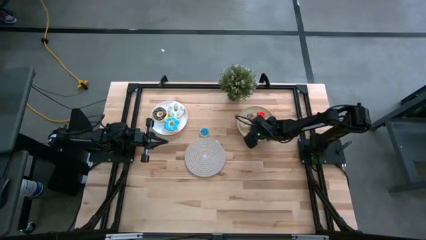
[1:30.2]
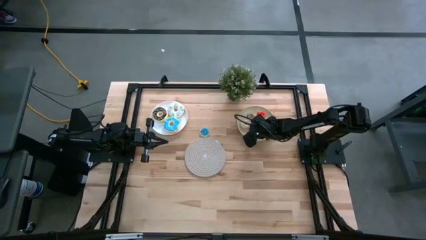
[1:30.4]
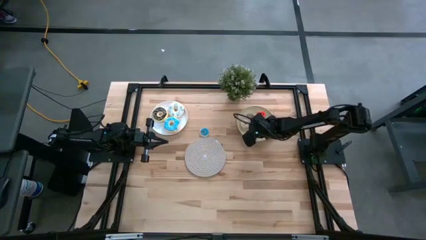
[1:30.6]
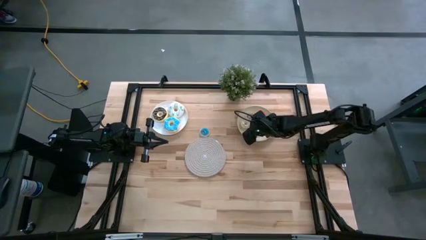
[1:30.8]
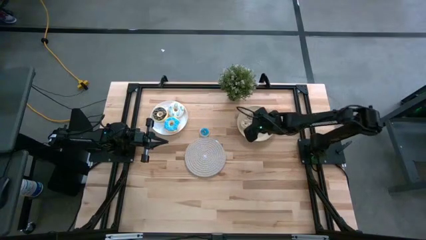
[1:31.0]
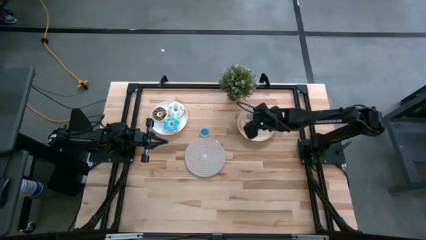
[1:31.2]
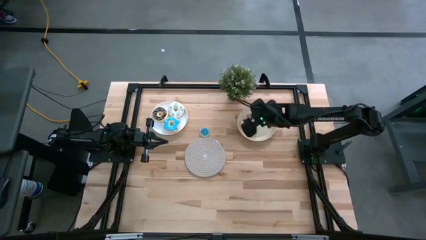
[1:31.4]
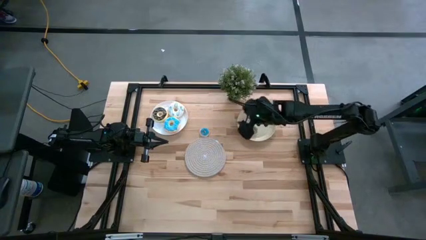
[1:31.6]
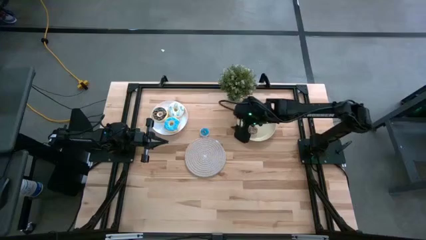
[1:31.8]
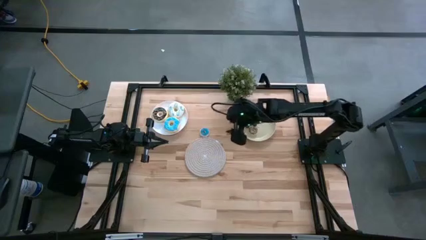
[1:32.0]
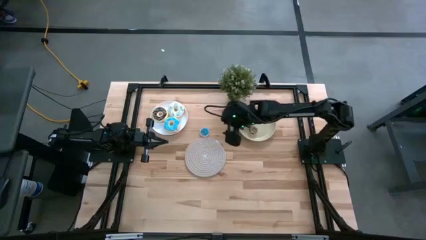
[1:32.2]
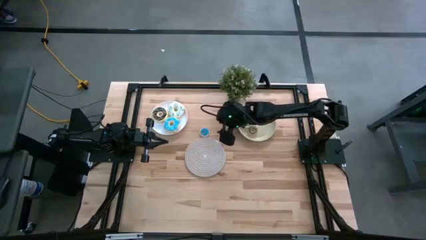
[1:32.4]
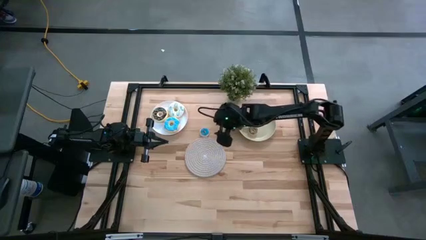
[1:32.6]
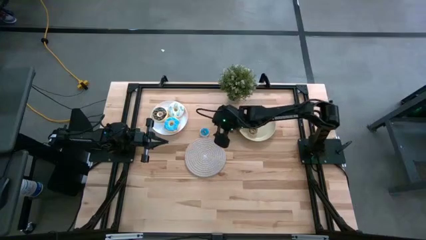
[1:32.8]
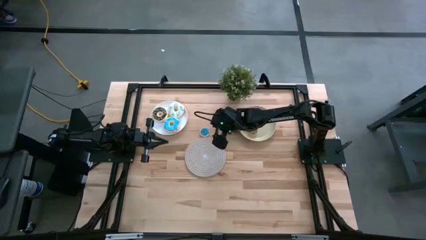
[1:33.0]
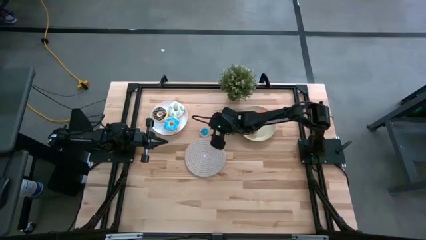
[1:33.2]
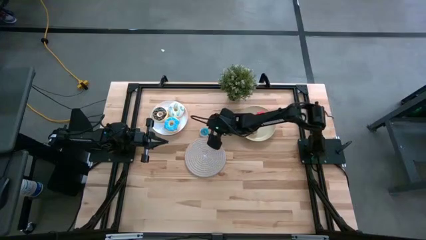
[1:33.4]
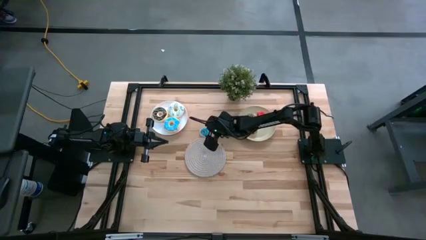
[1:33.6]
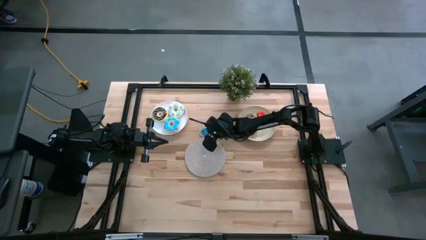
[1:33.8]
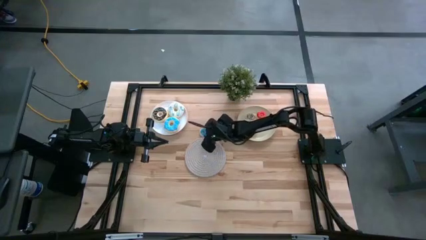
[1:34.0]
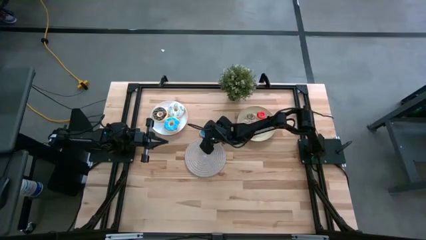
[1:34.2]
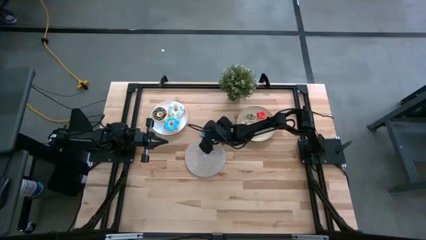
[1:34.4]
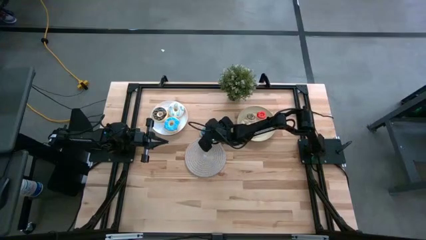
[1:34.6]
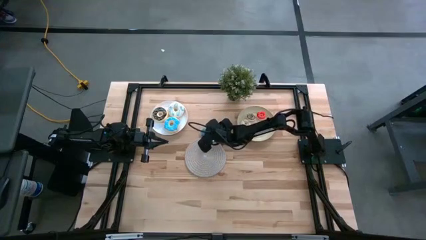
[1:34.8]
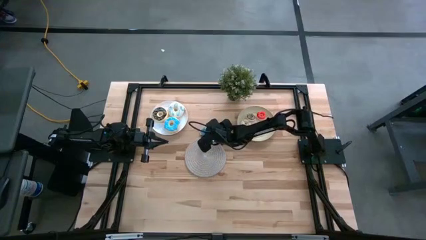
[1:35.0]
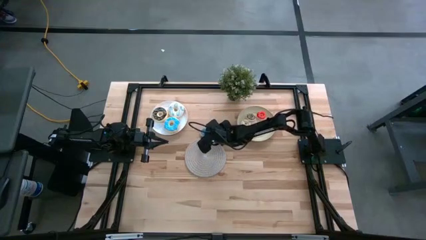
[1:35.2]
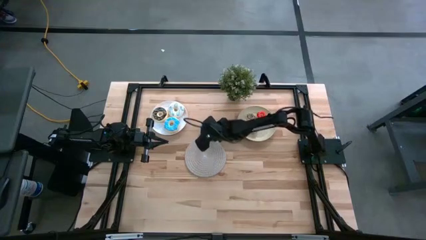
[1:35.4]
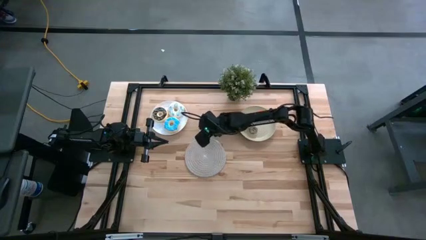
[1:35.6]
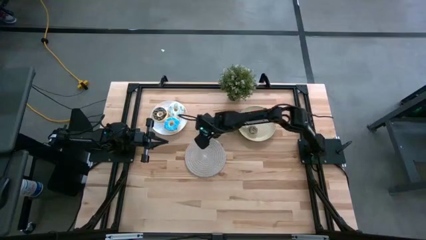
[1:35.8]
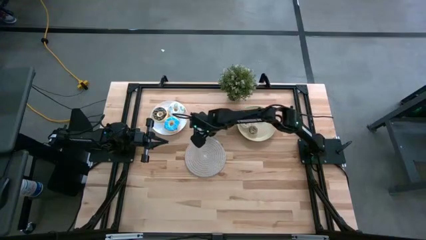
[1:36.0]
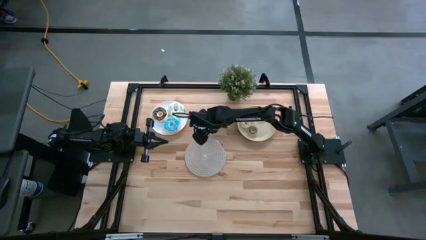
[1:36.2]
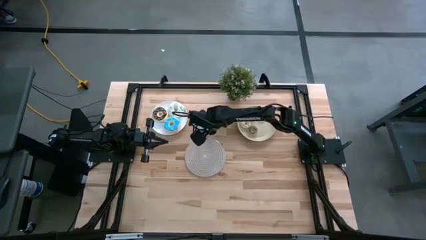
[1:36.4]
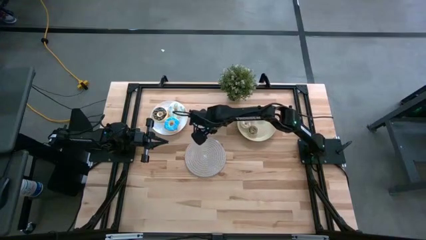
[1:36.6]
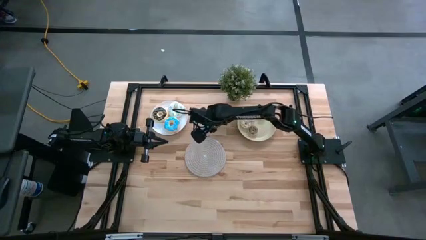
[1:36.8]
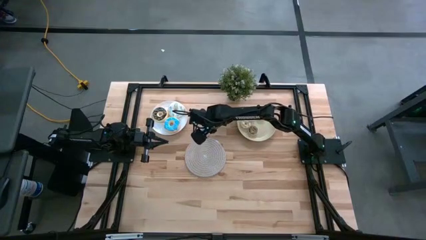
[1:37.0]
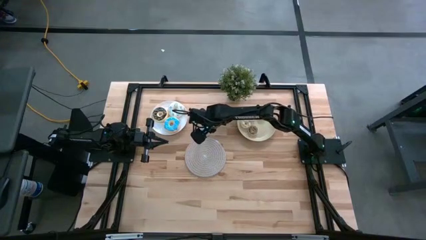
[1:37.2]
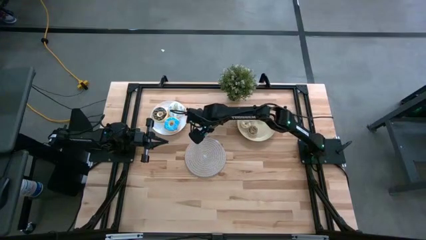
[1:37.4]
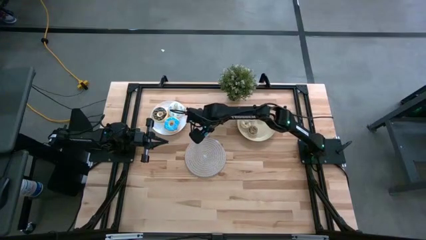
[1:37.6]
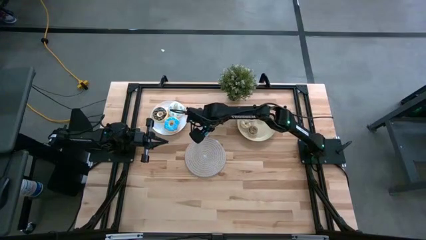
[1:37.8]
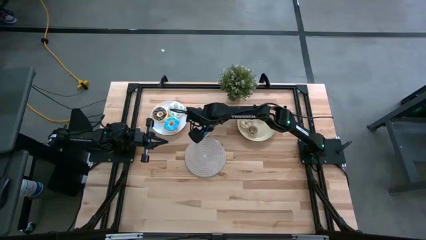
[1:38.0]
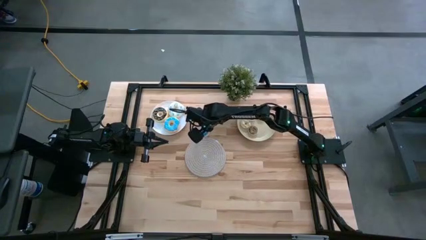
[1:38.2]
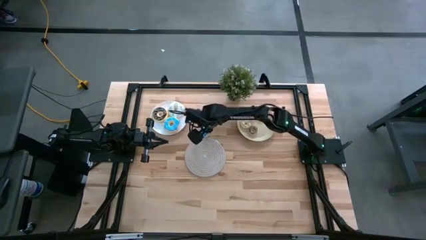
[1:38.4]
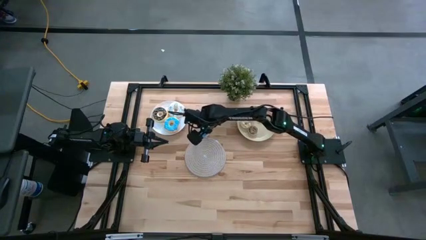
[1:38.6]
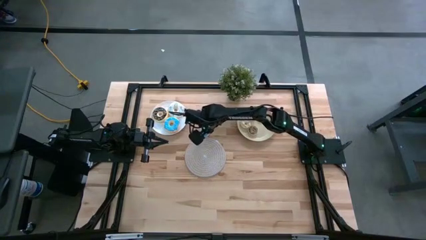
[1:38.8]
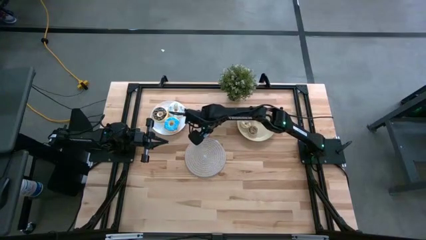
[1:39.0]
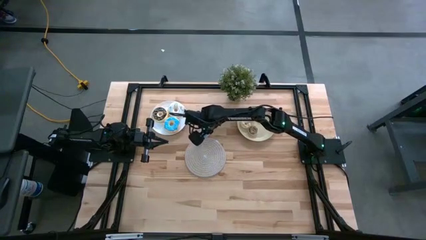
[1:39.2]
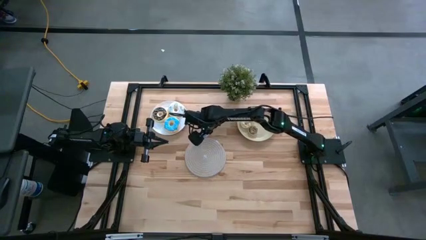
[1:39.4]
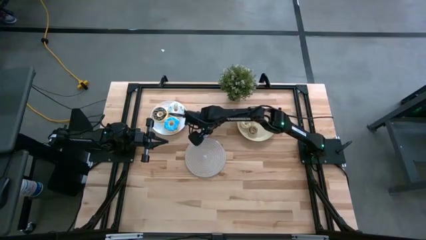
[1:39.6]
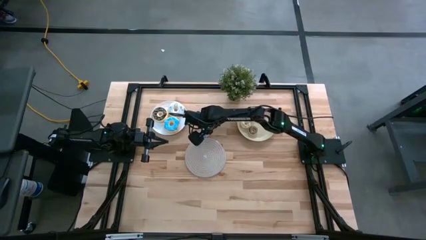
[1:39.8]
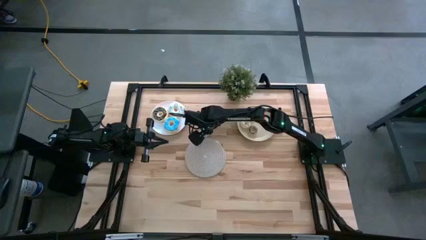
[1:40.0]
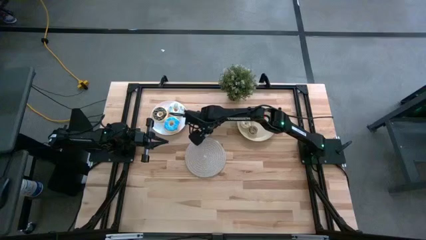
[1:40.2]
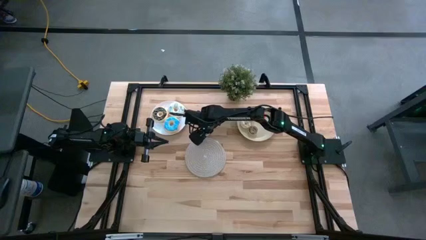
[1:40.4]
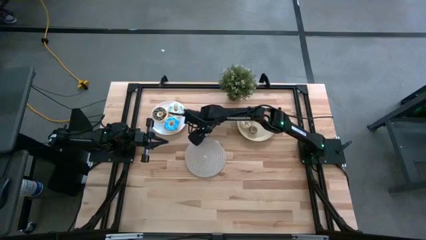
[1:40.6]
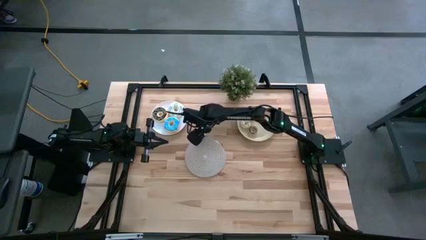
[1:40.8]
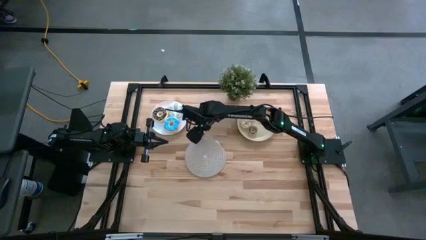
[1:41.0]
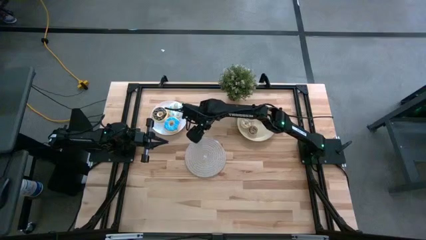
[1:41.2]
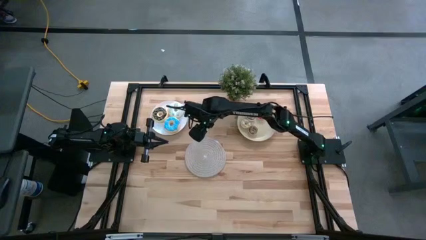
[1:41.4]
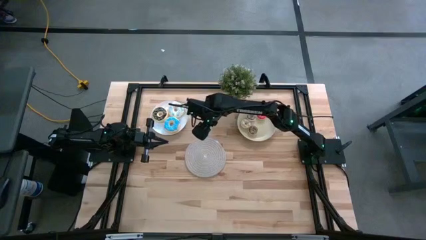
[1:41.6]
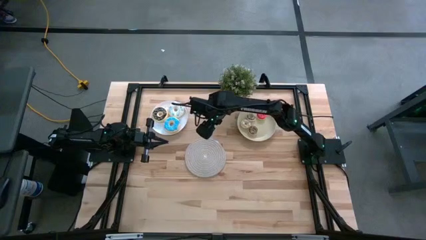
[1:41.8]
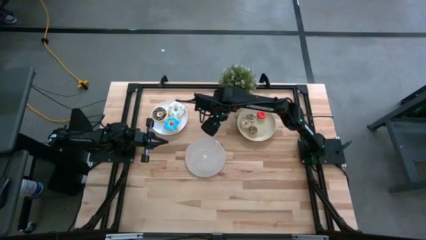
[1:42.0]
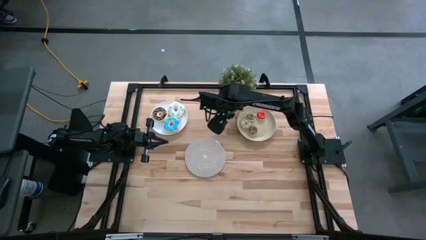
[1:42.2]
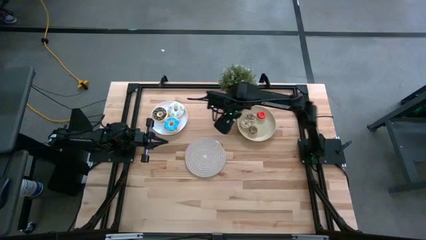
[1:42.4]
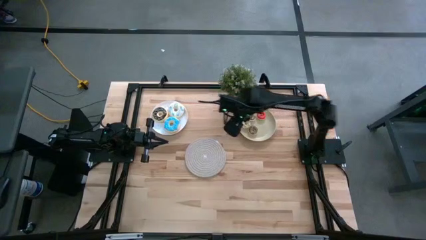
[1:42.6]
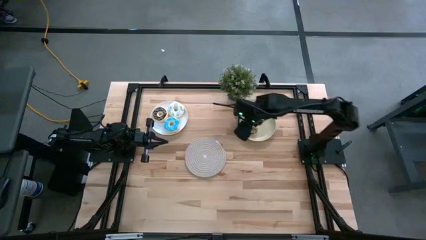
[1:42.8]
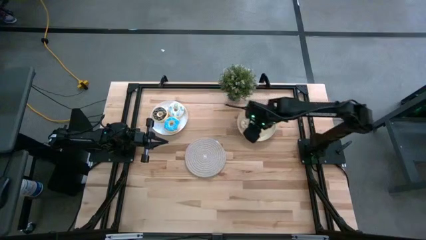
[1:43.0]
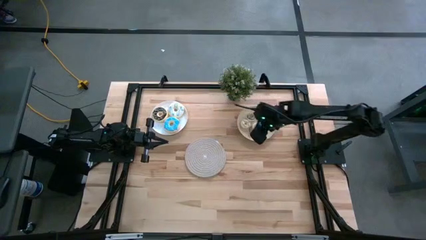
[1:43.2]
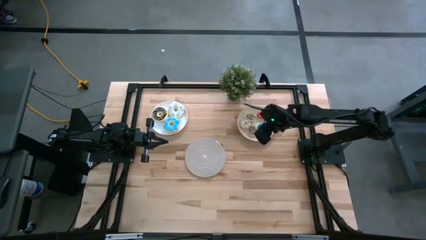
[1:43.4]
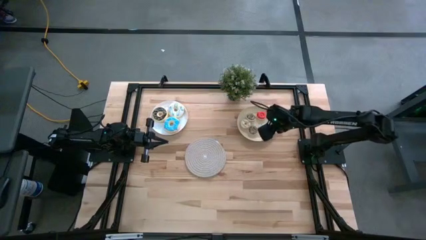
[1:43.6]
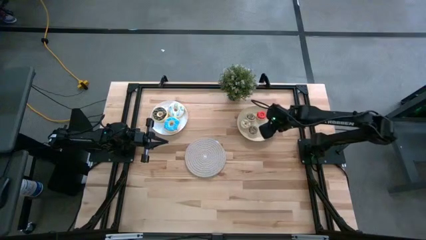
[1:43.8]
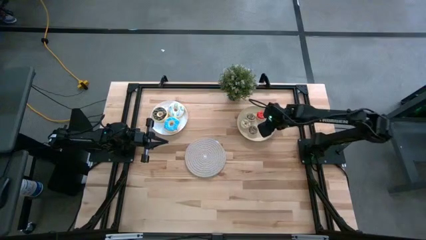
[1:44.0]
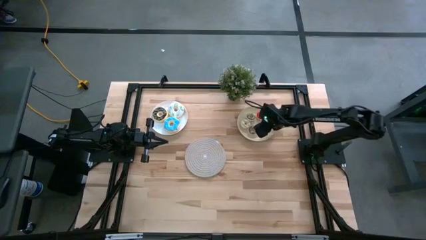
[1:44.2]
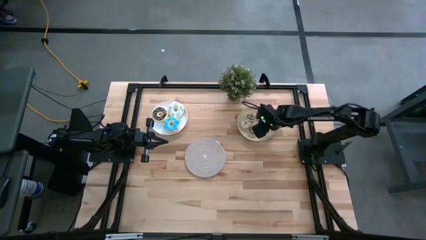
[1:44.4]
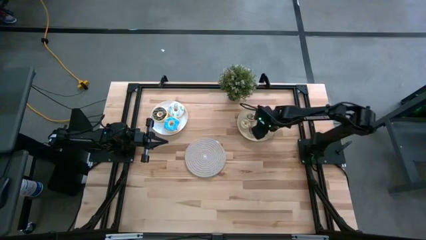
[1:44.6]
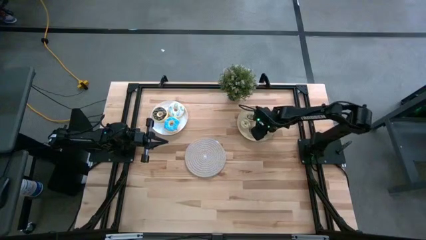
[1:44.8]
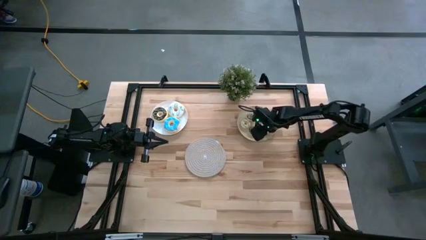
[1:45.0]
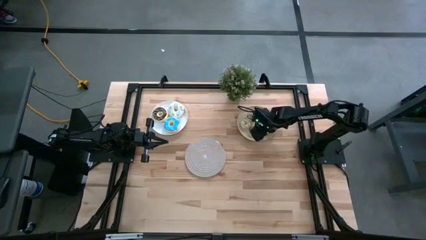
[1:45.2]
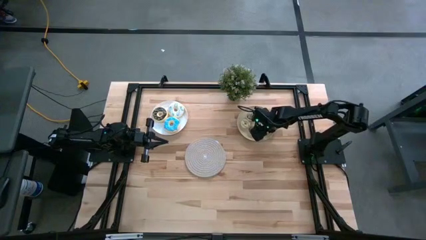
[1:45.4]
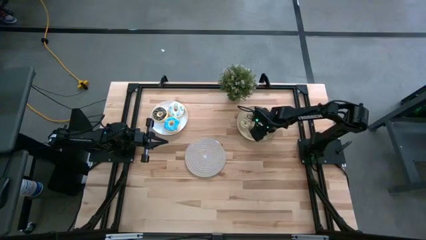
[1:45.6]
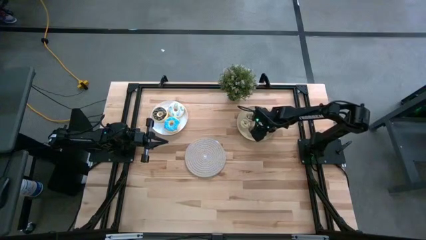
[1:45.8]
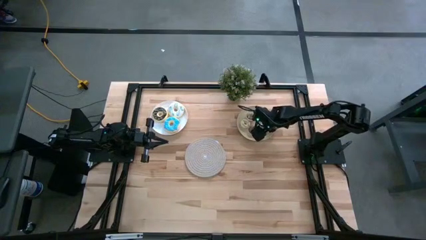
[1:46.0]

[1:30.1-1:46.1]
Task: Pick & Place donuts
Put the small blue donut on the brown plate
